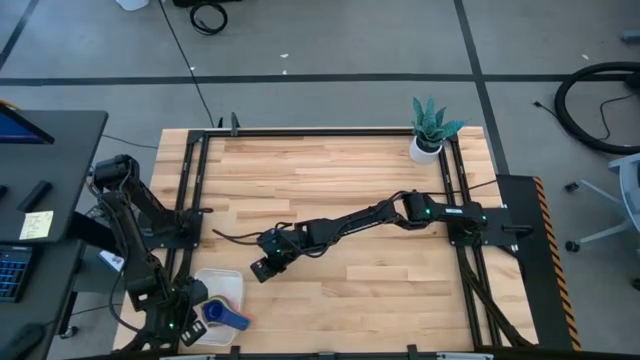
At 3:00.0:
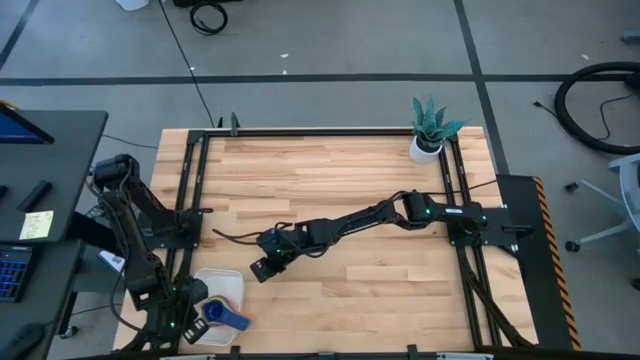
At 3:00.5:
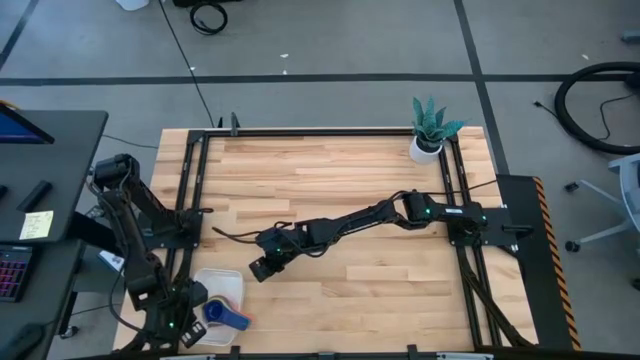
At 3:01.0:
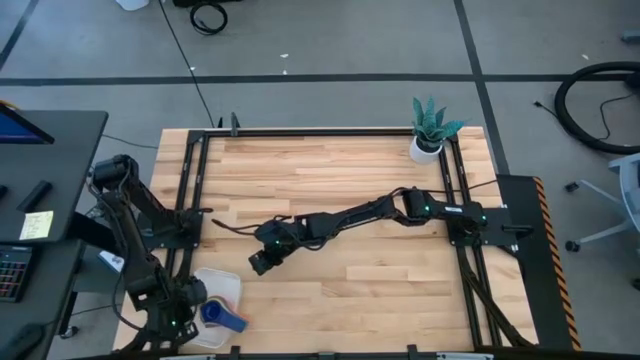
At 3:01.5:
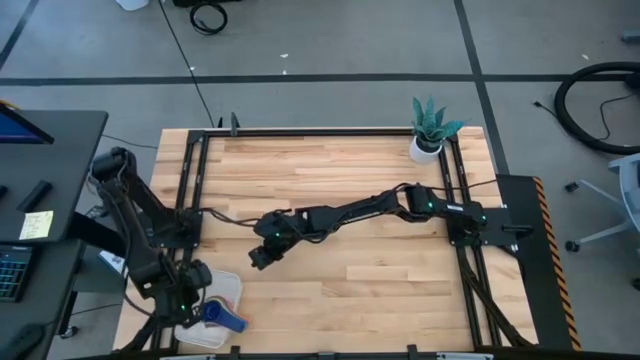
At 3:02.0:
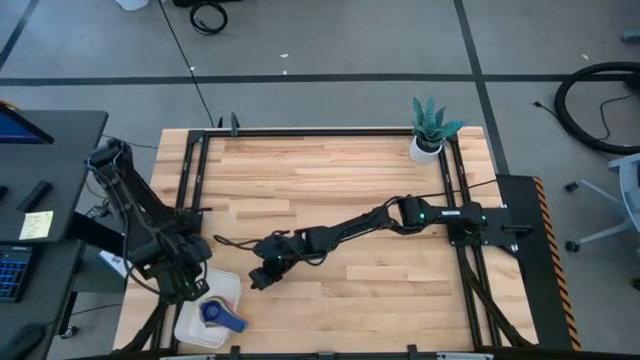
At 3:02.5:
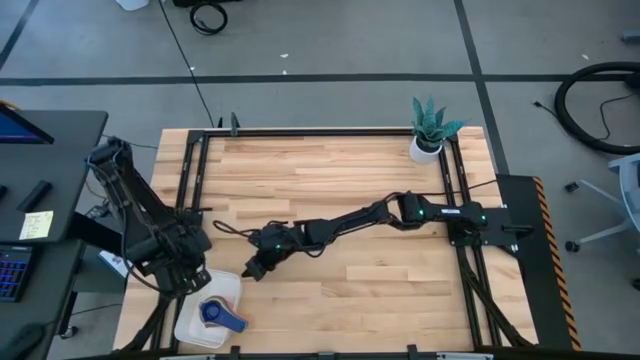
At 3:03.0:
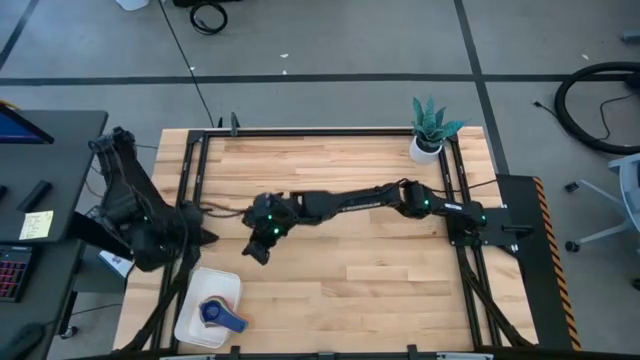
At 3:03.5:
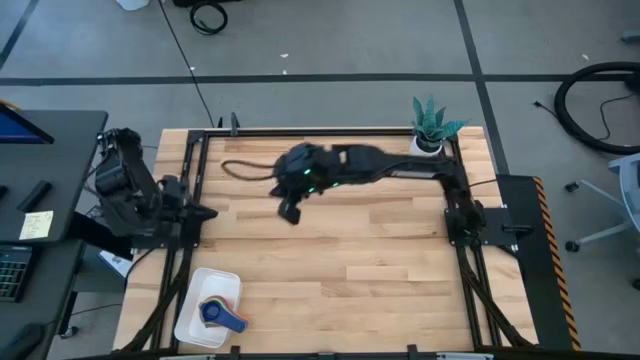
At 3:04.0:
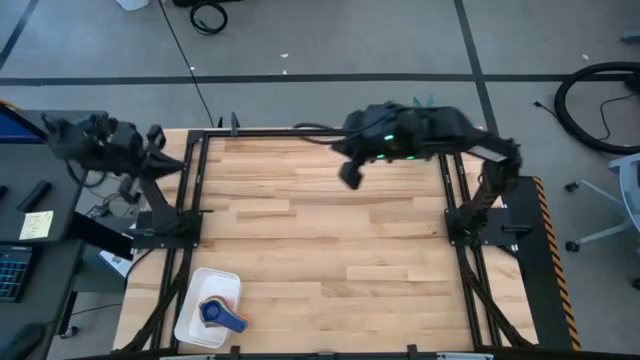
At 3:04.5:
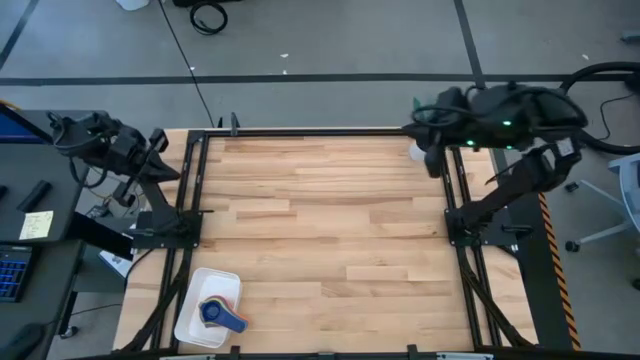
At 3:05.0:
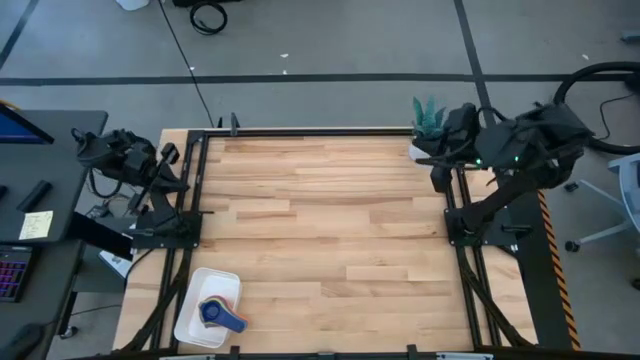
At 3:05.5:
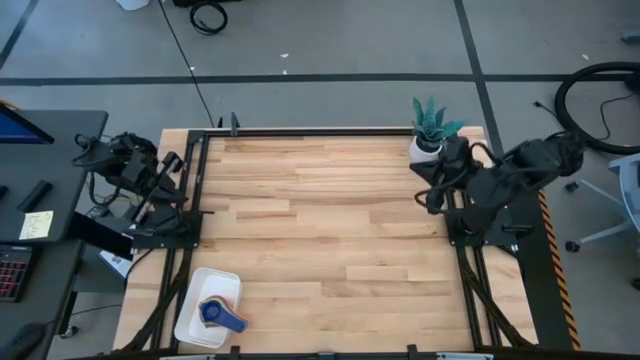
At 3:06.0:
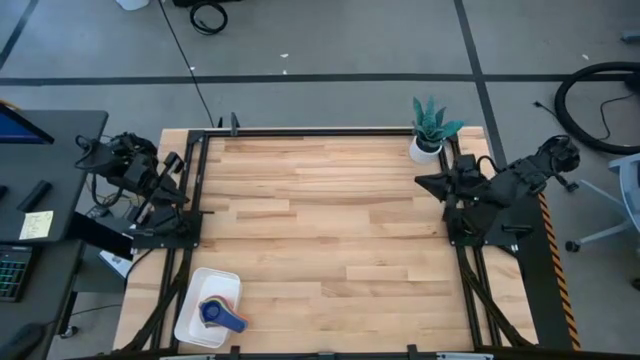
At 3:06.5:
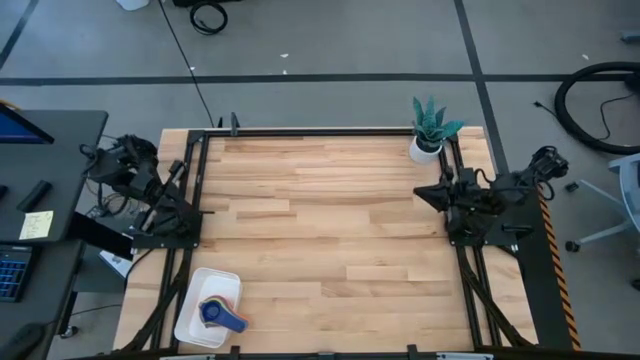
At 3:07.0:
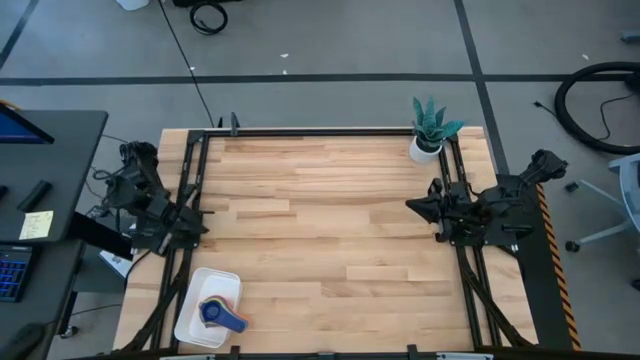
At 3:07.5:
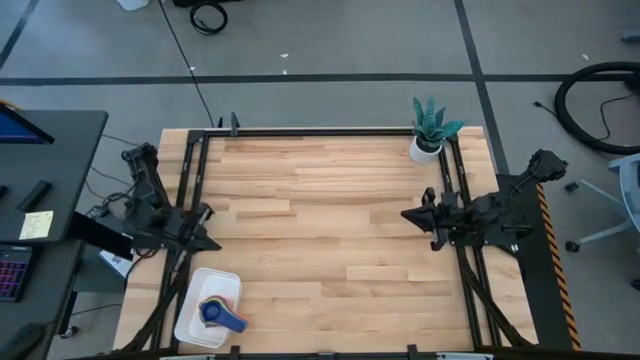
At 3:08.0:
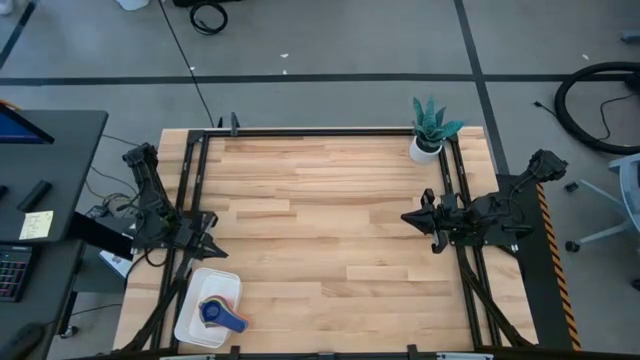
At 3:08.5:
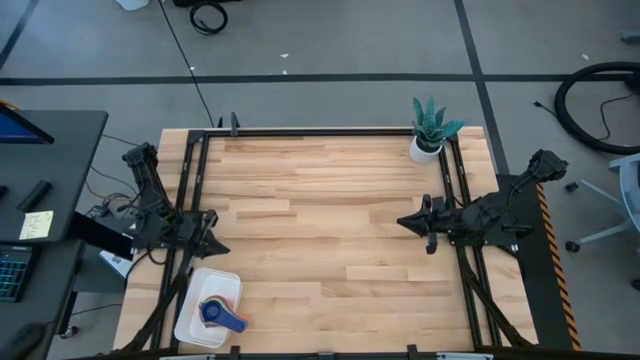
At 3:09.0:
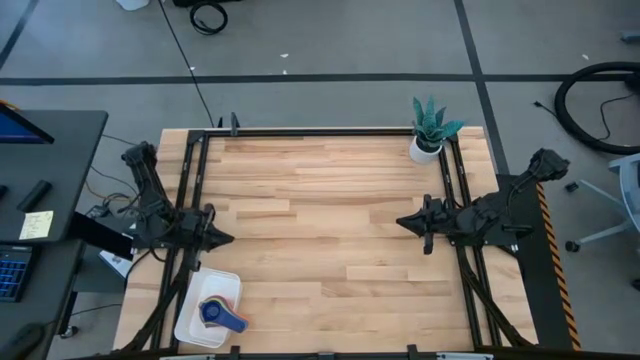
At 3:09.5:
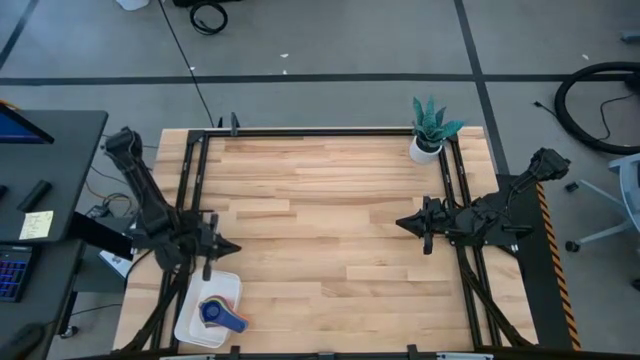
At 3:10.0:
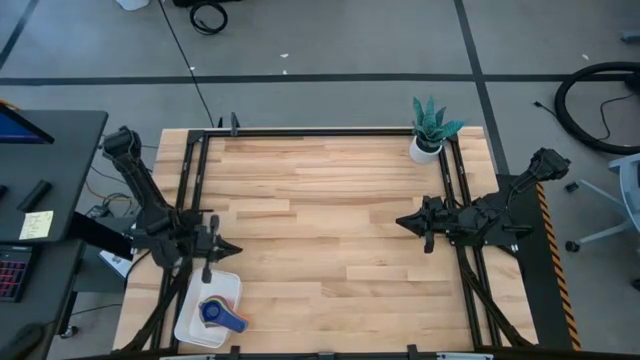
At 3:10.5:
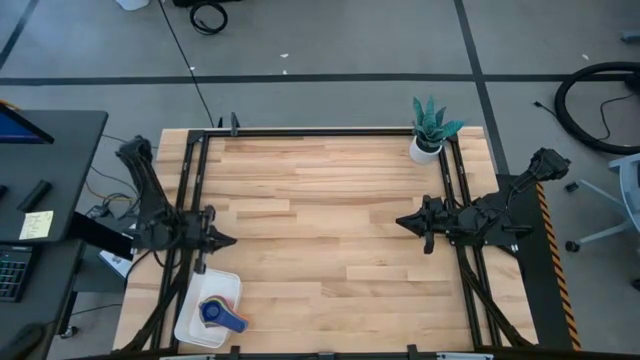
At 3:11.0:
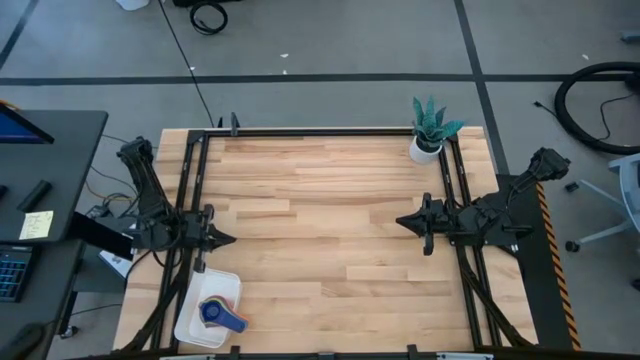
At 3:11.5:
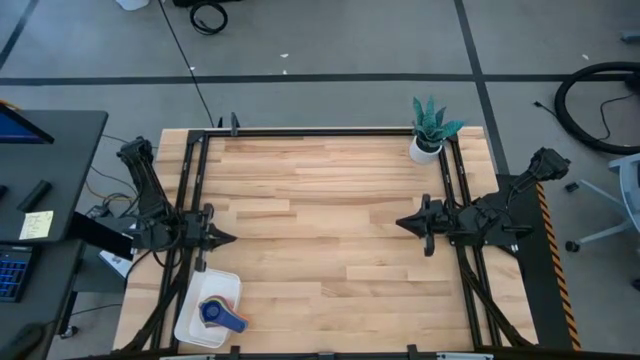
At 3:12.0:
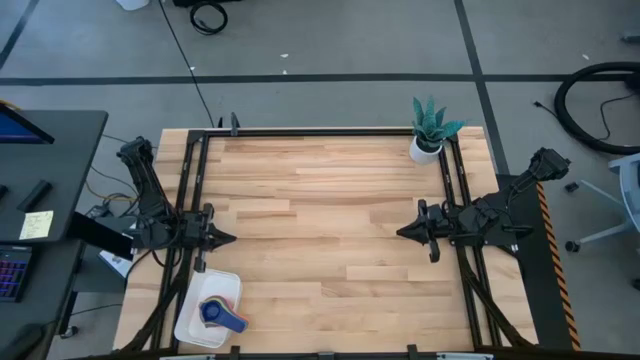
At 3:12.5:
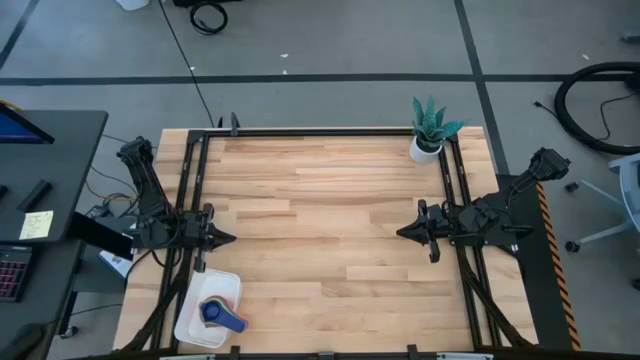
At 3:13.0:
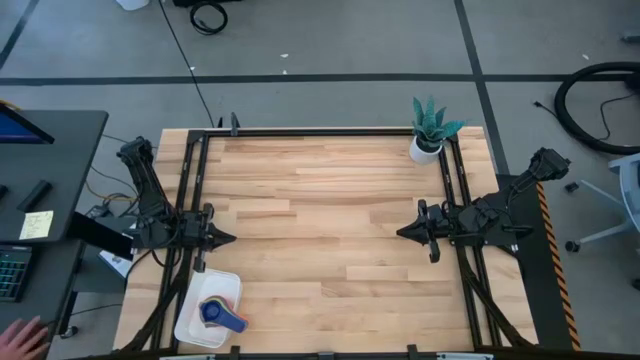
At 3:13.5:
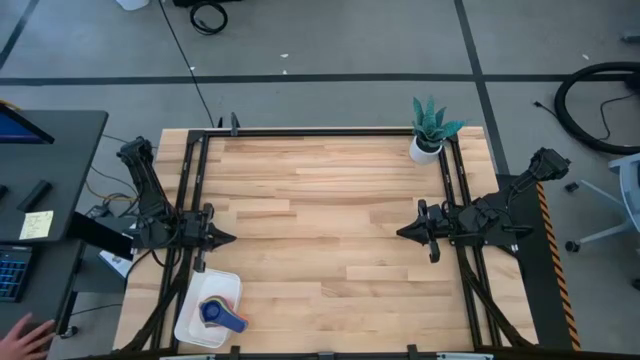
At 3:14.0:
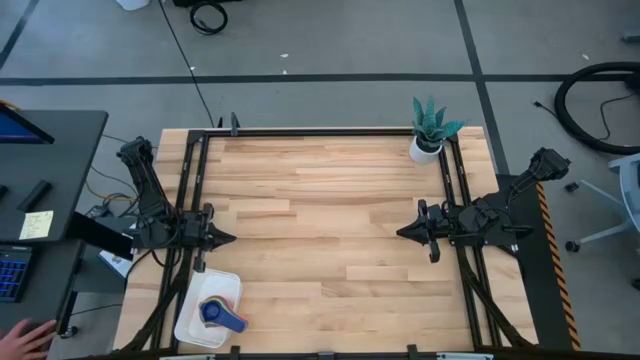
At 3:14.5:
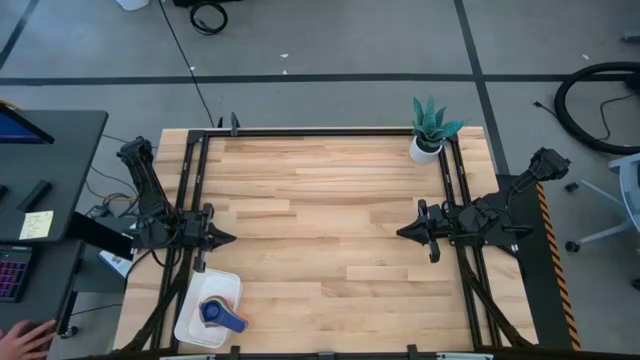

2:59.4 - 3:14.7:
Task: Nest measuring cups in basket
Return to Home Position

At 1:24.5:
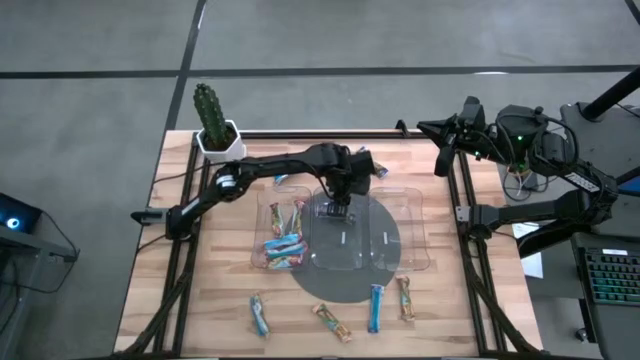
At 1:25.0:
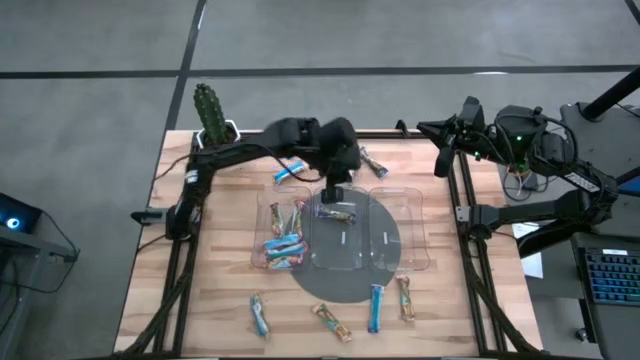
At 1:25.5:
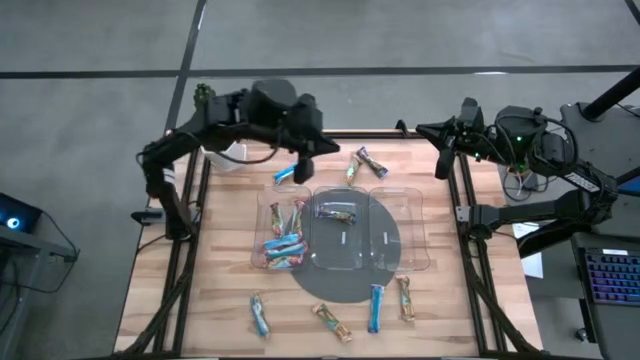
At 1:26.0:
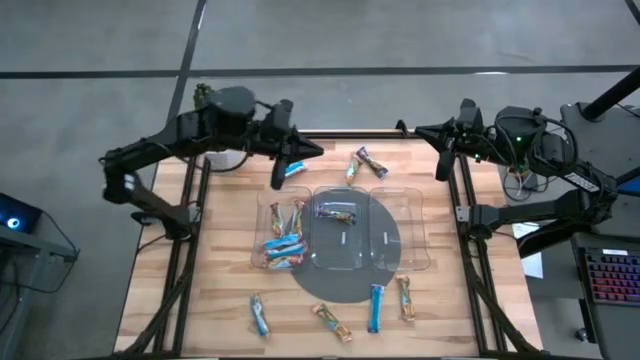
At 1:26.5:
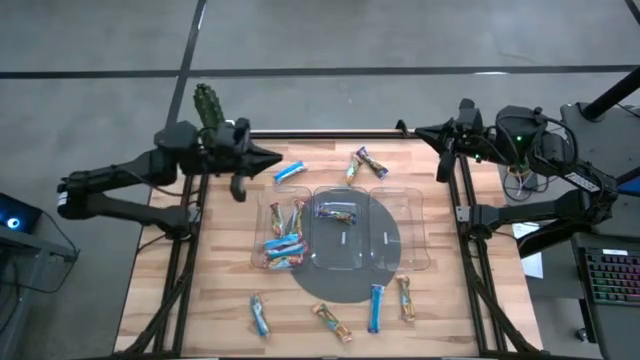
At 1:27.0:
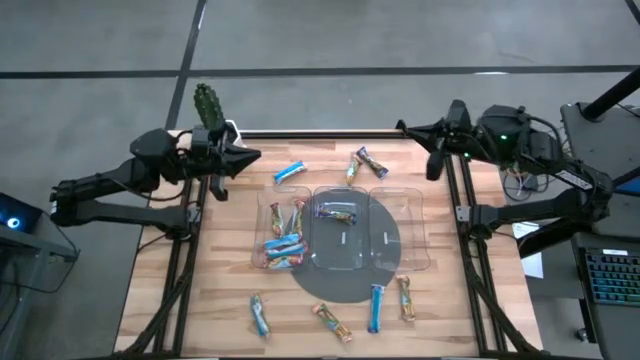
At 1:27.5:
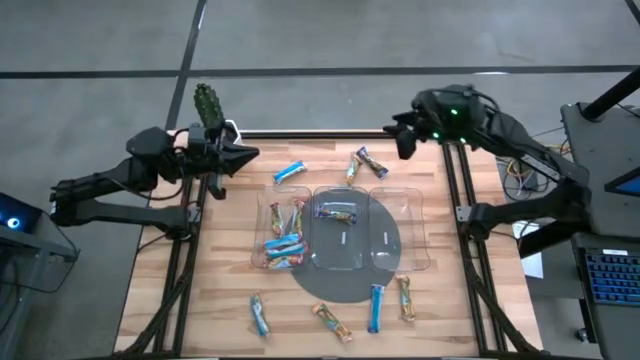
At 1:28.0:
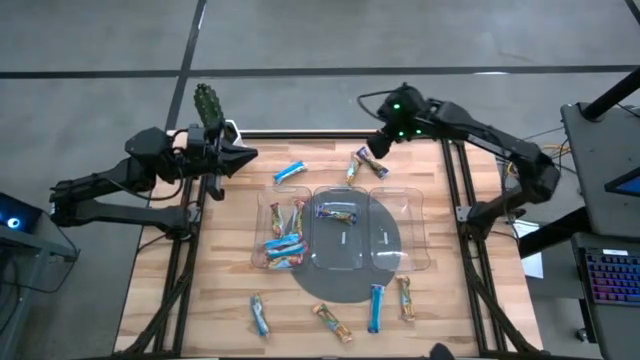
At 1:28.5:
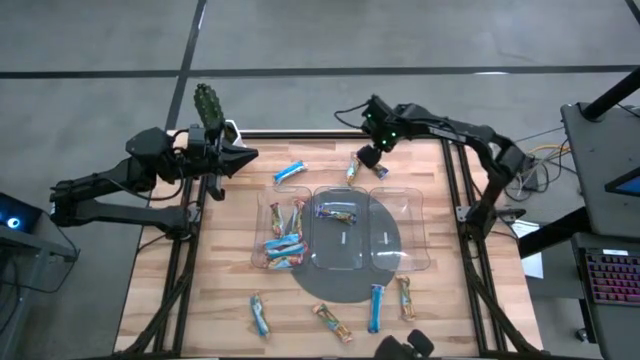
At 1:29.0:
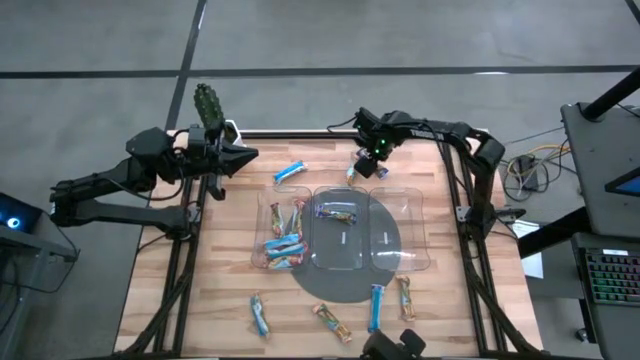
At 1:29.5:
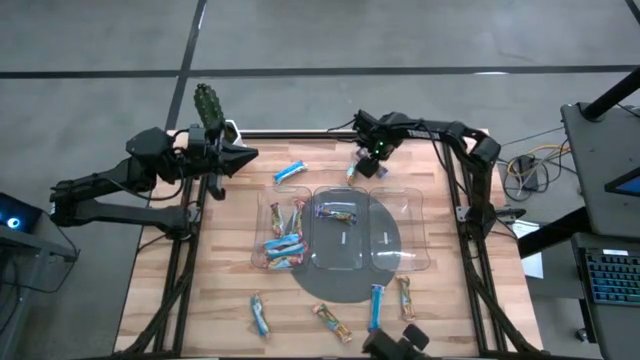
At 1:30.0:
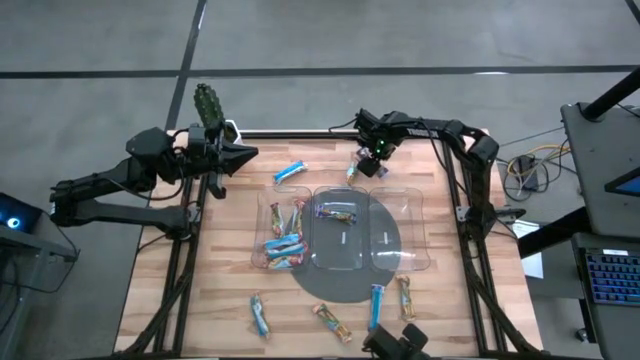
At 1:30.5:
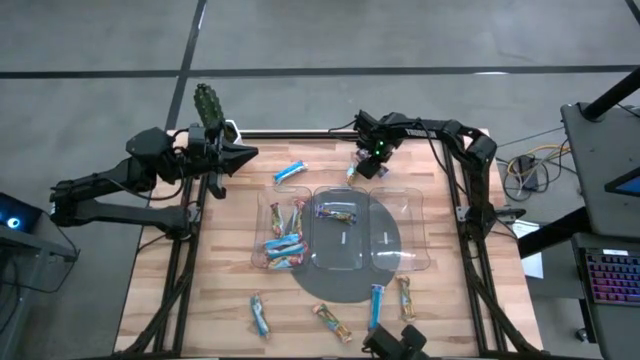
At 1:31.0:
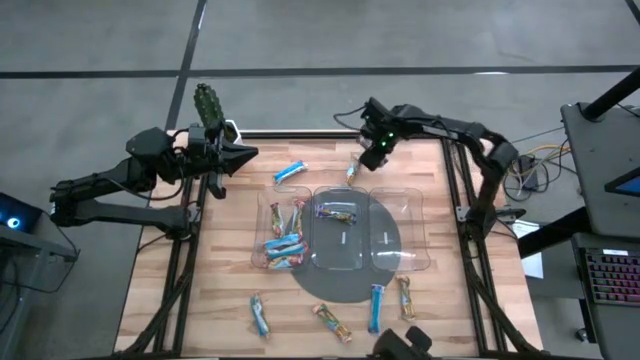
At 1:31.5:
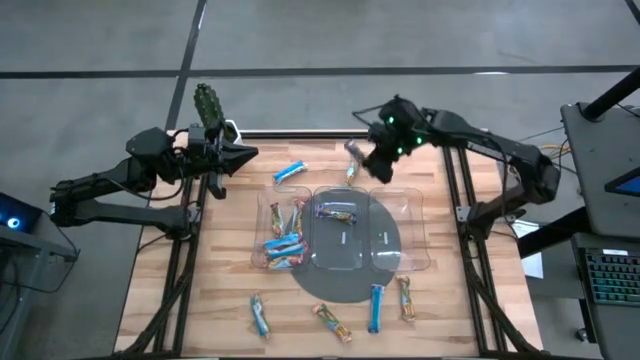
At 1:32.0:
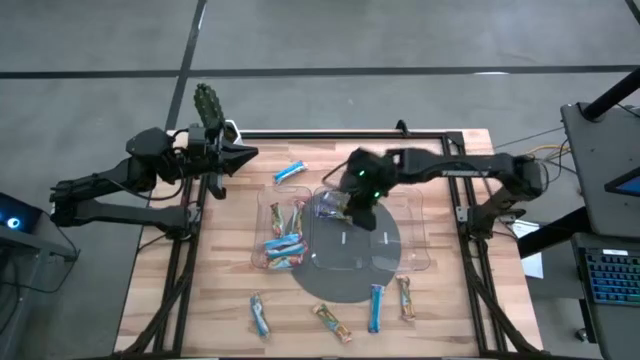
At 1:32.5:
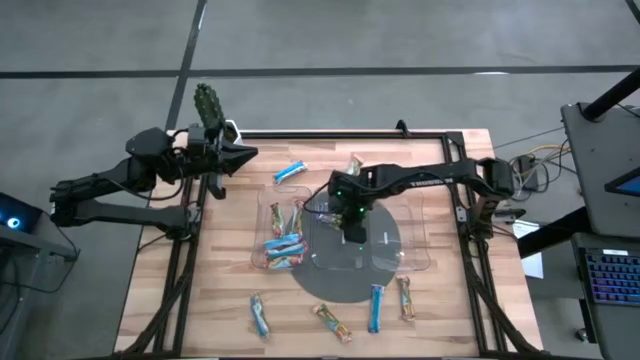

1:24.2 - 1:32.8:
Task: Pick and place Granola Bars by type
Put the blue granola bar into the middle transparent bin
